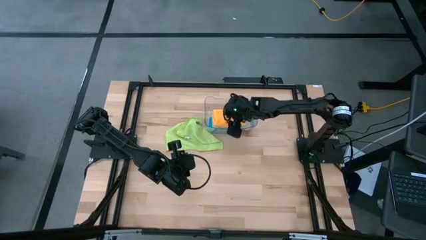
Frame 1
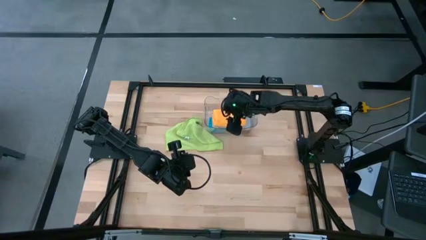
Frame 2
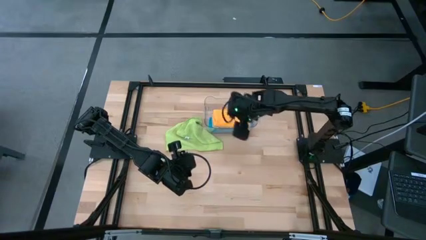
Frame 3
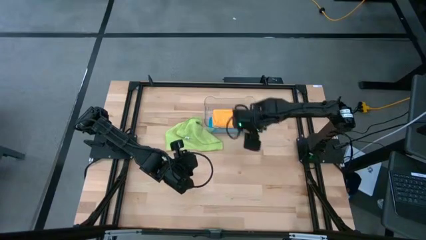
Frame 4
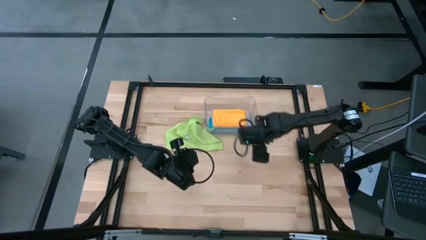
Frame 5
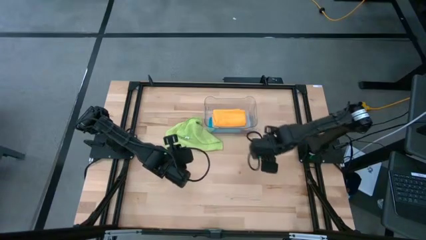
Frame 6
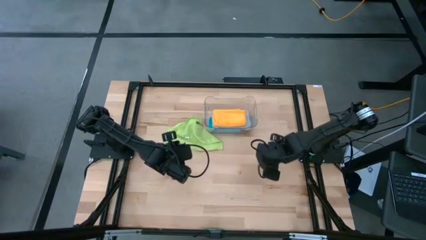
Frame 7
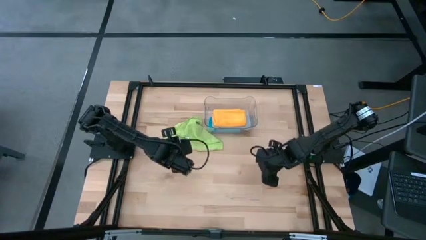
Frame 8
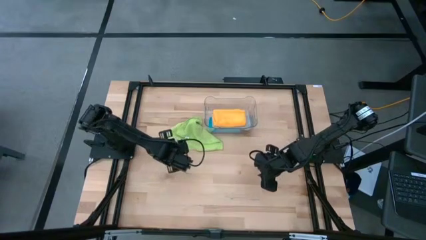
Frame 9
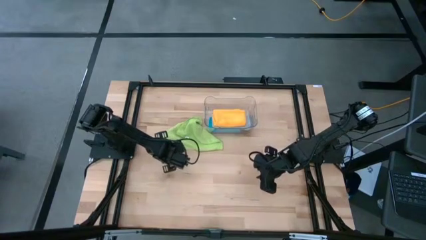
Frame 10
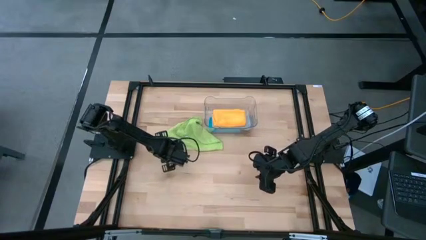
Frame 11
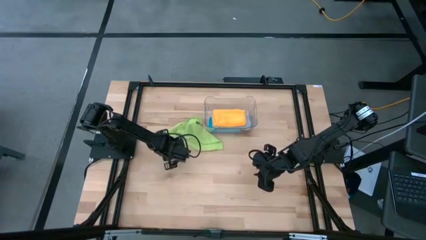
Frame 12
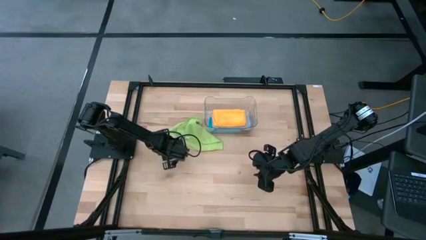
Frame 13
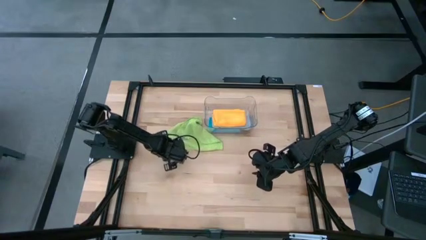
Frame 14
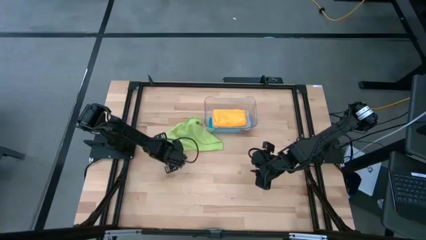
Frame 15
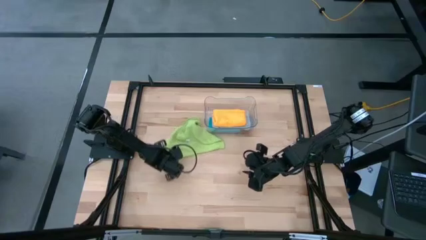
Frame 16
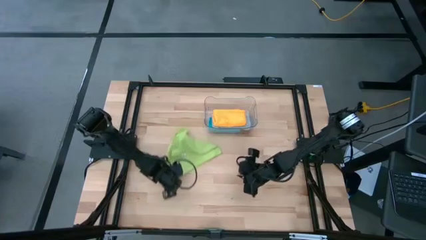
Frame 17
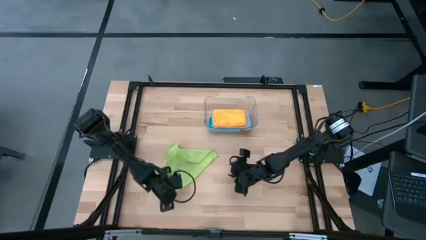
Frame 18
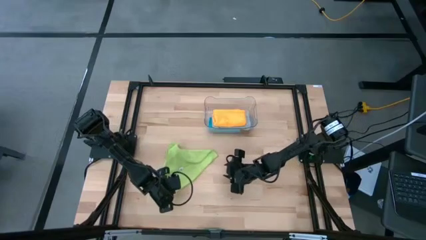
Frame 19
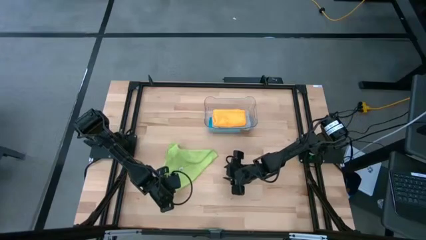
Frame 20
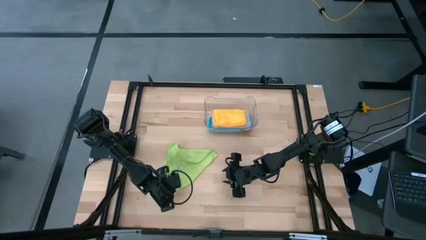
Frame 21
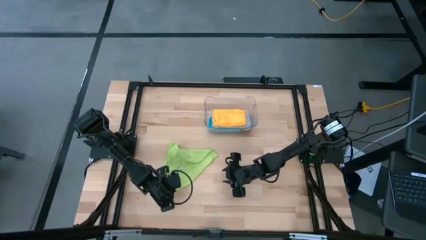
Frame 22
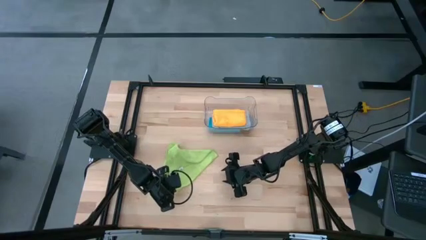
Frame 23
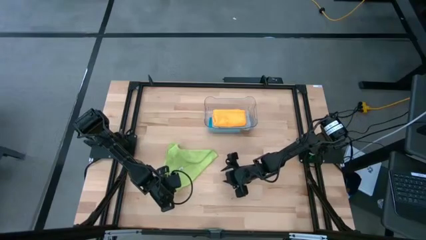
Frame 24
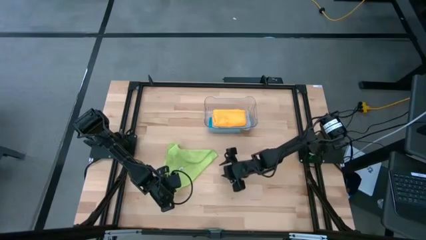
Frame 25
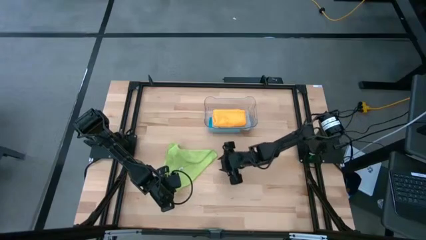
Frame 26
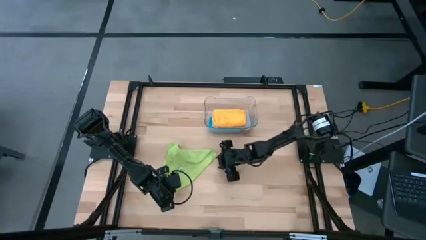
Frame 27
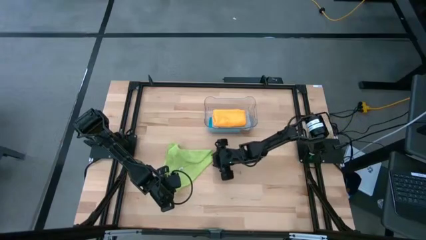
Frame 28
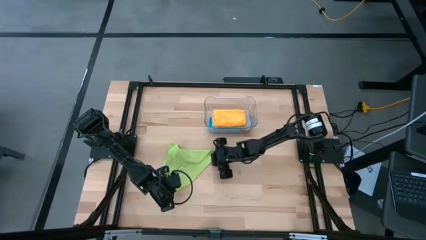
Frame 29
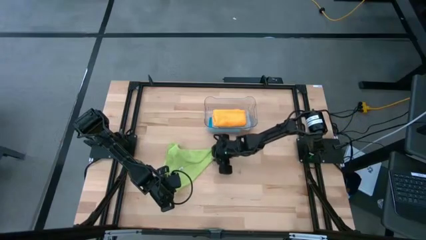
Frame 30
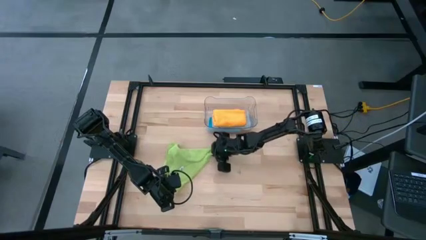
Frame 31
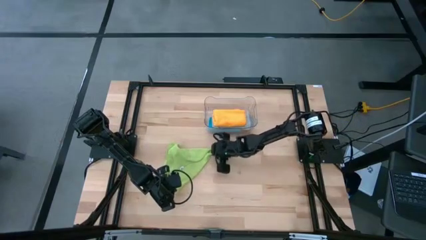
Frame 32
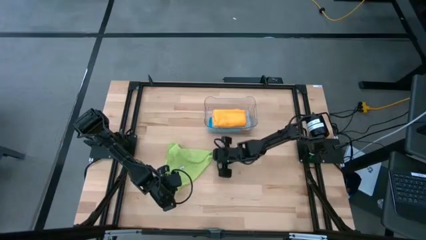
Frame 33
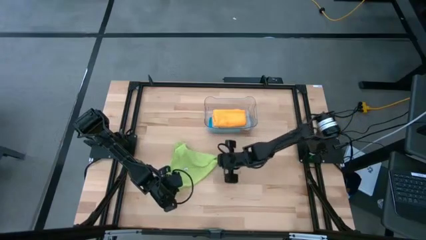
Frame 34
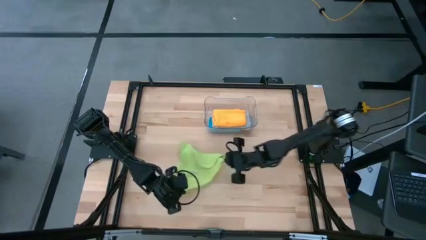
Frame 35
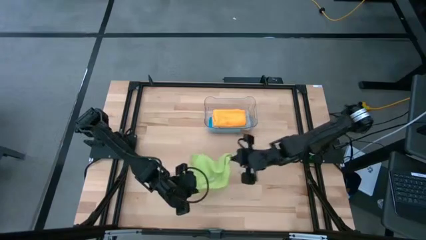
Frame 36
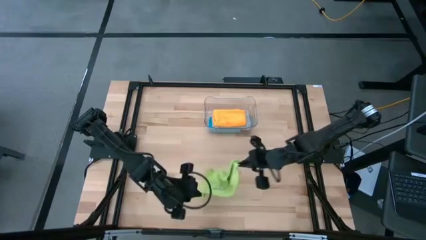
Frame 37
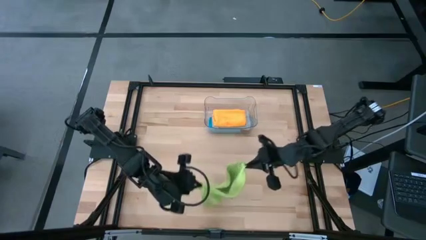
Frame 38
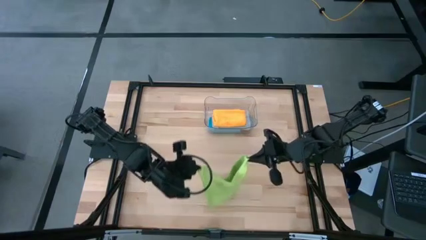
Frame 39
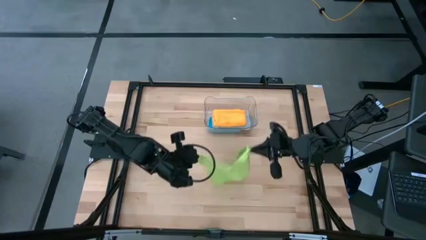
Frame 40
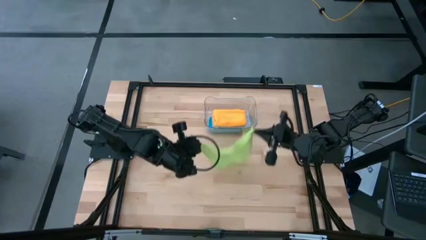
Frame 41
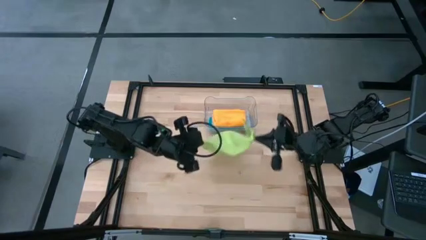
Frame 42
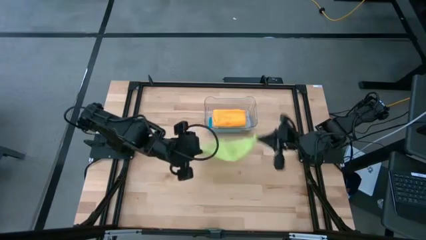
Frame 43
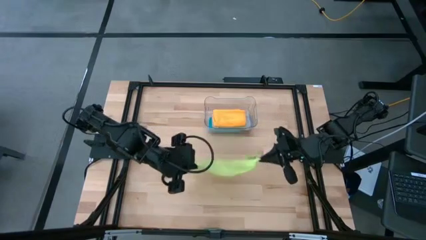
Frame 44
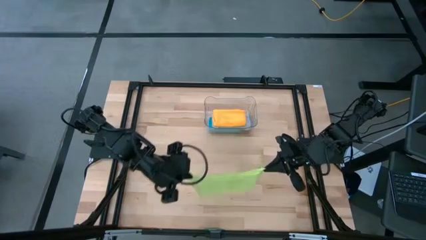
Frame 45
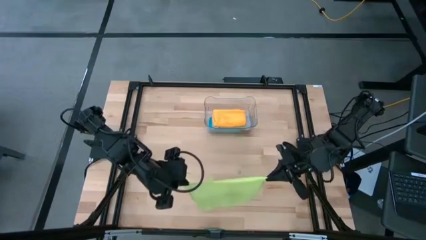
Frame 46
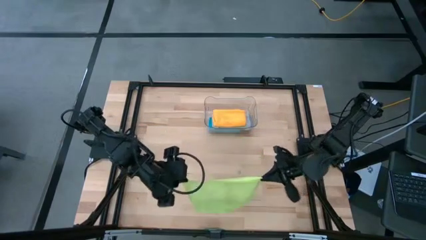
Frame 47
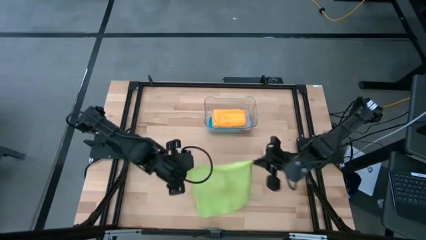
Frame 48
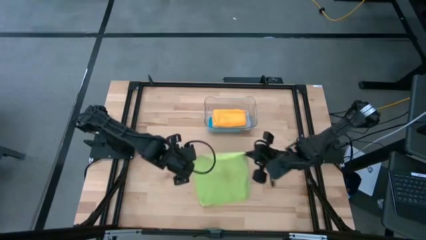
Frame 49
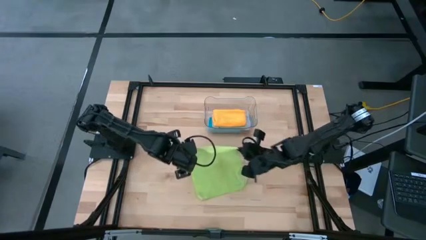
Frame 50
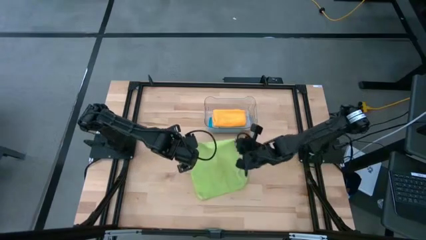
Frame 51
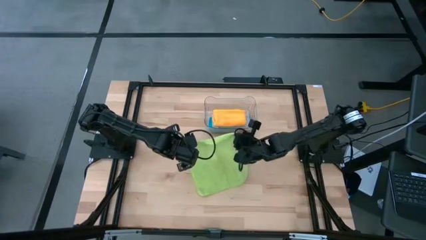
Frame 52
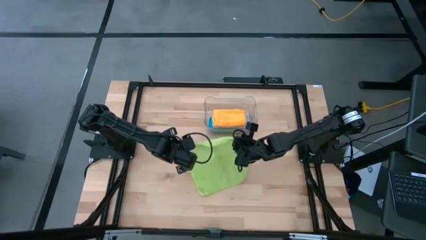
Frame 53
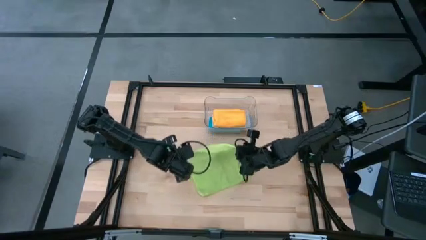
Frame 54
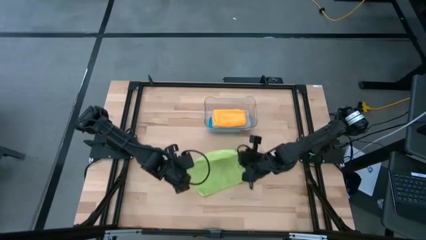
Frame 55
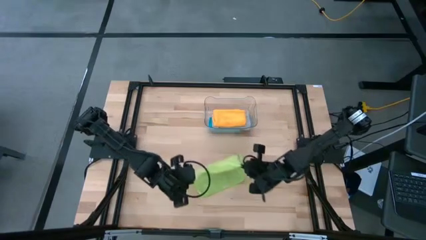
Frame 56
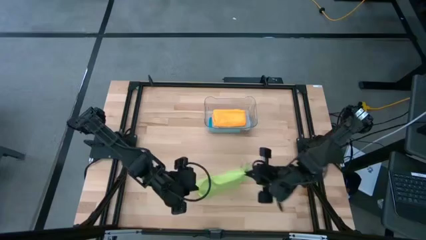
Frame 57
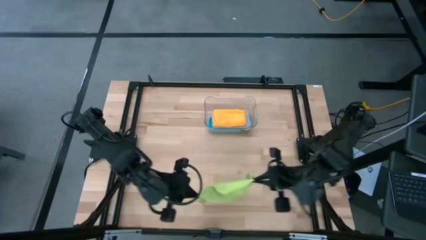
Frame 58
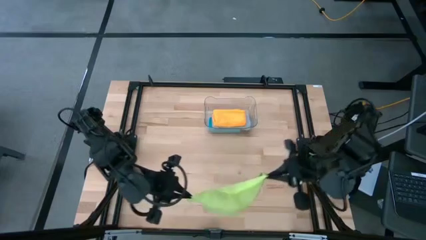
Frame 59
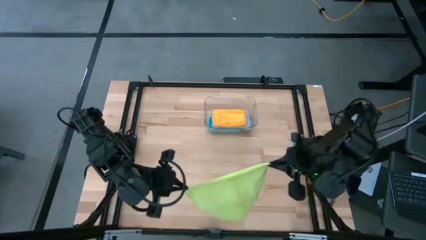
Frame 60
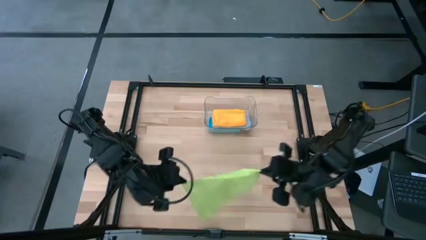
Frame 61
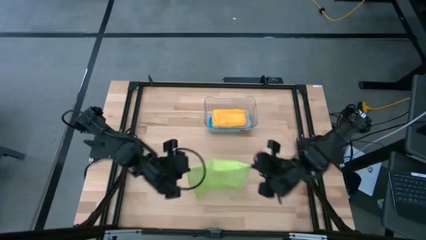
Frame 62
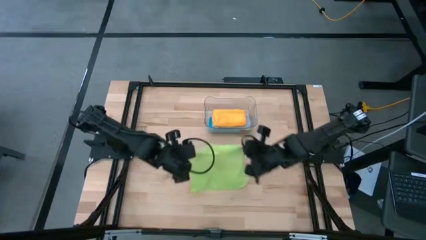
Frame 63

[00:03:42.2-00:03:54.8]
Task: Fold microfiber towels
Fold the green towel

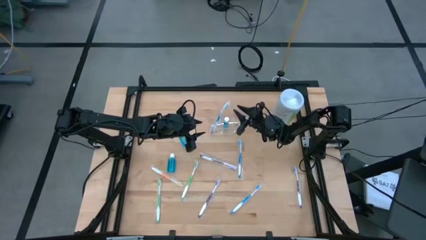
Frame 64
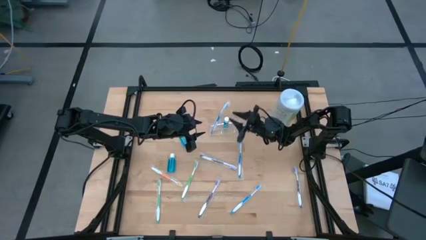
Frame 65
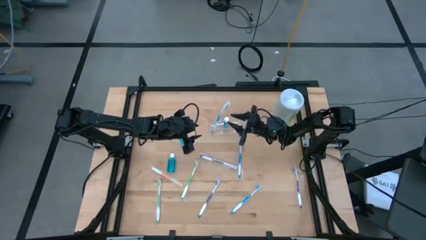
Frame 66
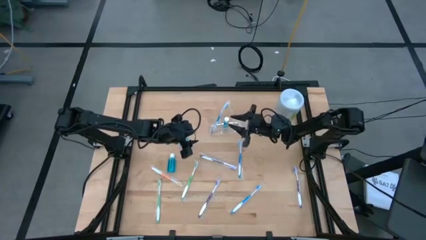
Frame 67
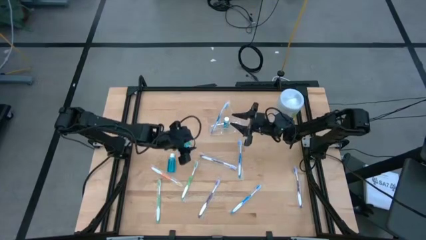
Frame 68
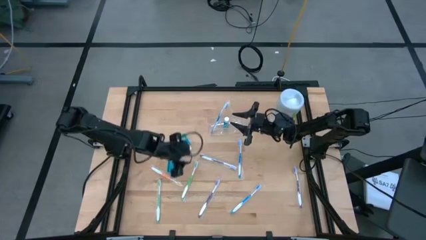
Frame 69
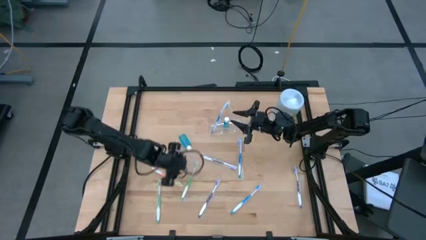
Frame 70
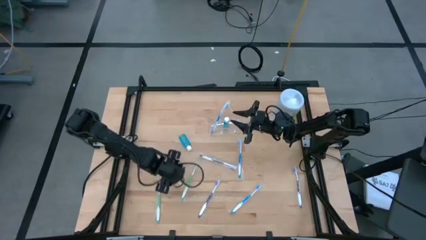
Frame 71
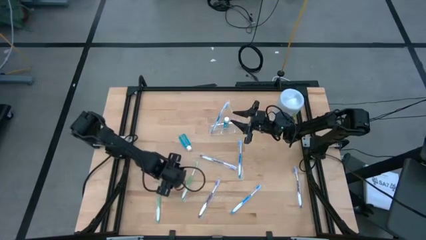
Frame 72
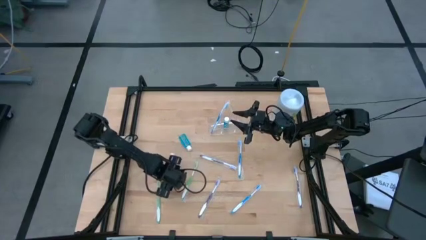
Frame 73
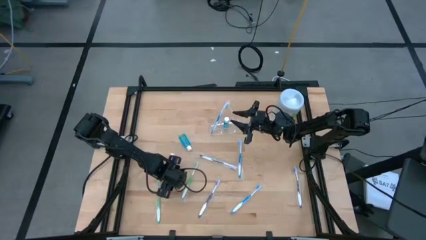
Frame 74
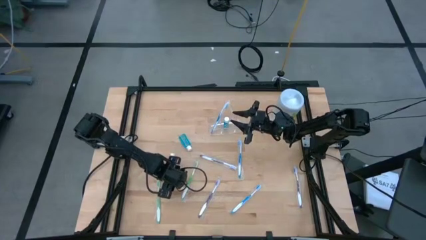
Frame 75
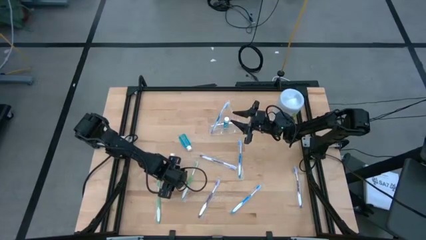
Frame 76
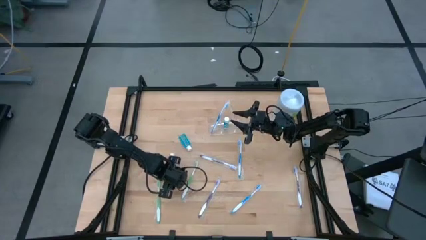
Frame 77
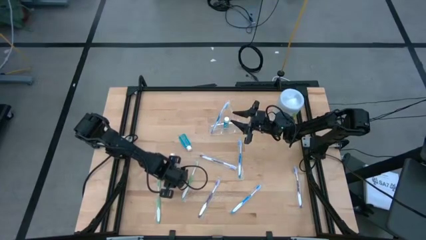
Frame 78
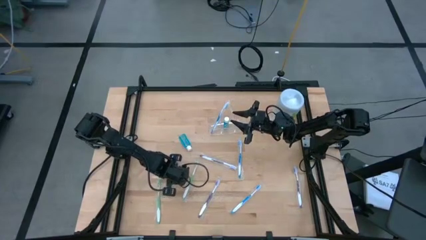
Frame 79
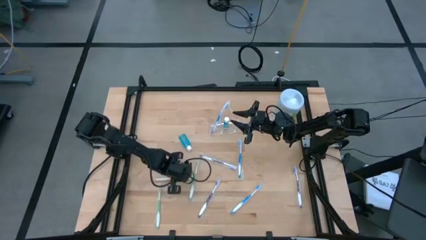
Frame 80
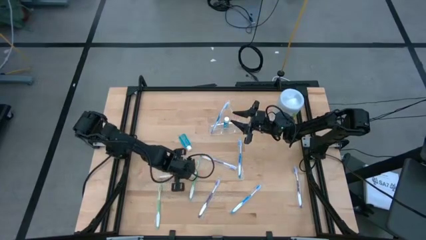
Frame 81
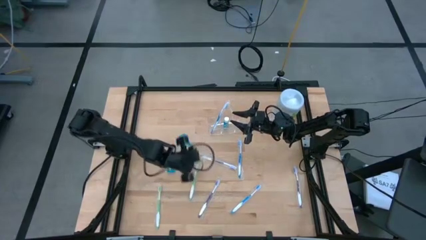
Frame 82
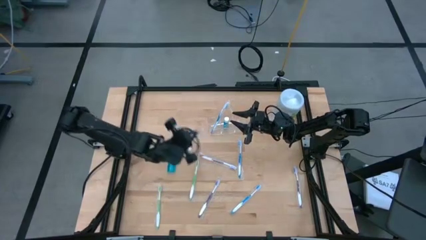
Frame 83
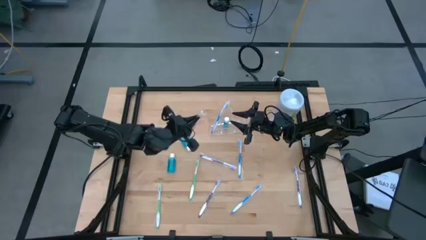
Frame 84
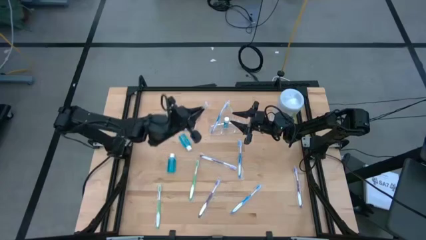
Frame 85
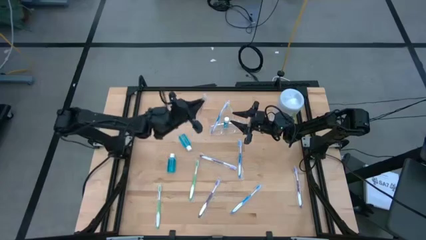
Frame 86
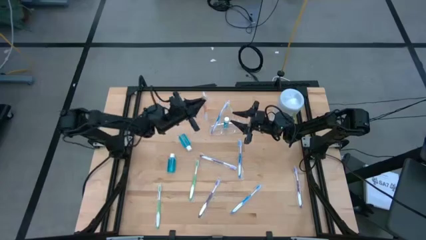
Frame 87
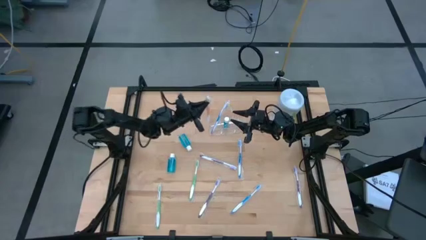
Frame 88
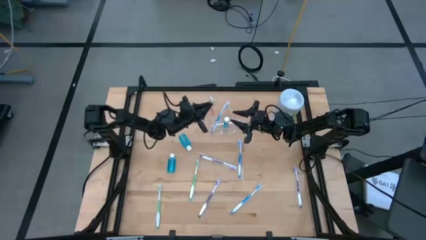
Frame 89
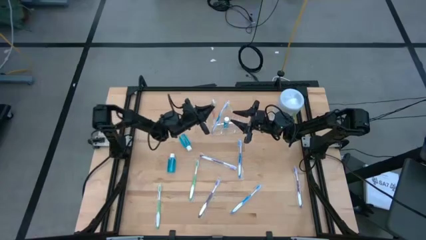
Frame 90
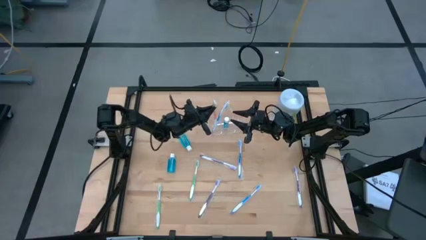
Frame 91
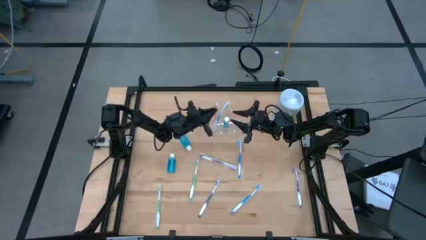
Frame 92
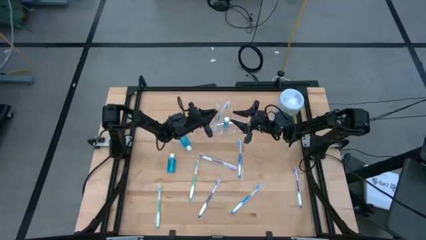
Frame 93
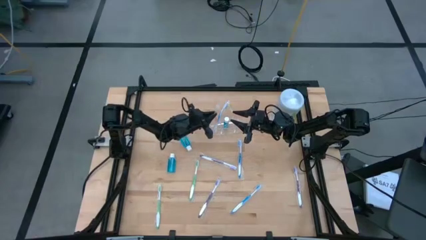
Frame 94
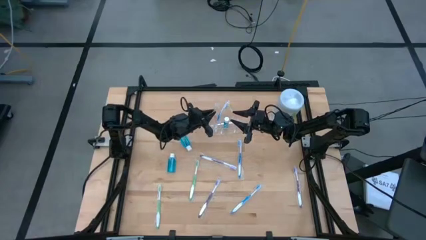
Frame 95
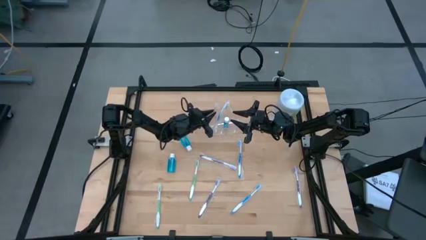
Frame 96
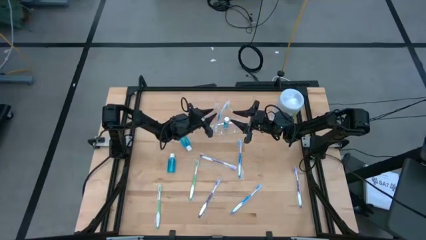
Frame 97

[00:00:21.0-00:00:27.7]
Task: Pick & Place toothbrushing station
Put the orange toothbrush into the transparent organizer
